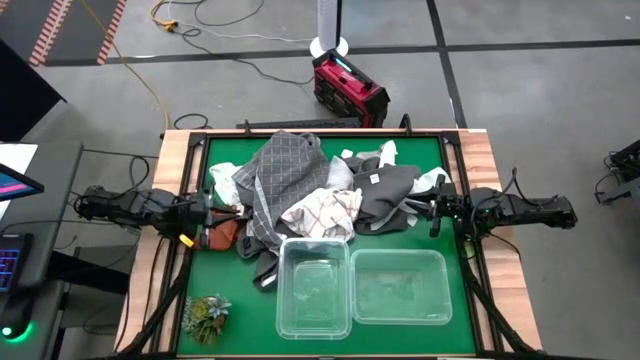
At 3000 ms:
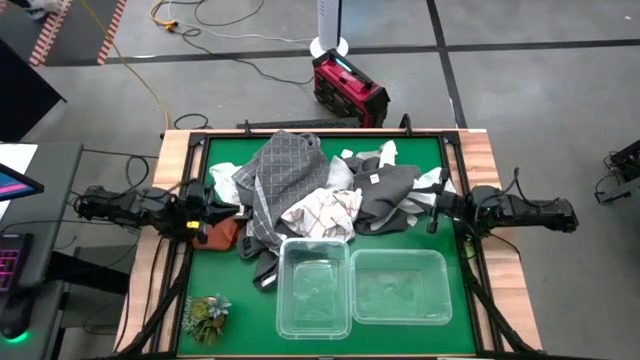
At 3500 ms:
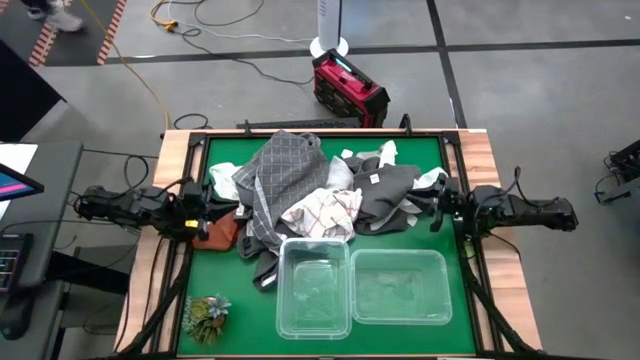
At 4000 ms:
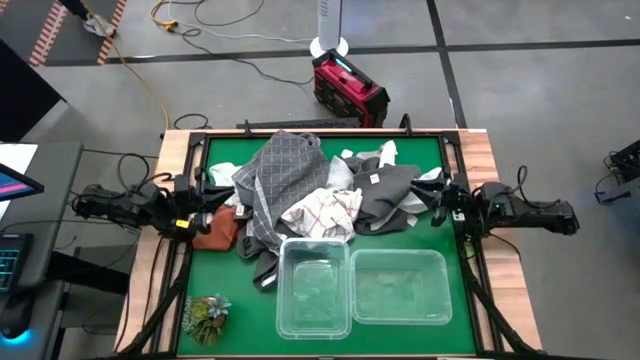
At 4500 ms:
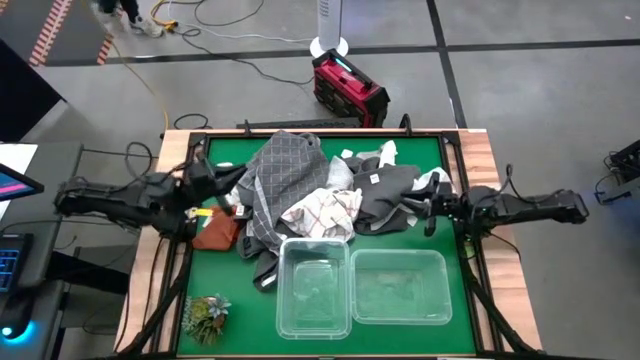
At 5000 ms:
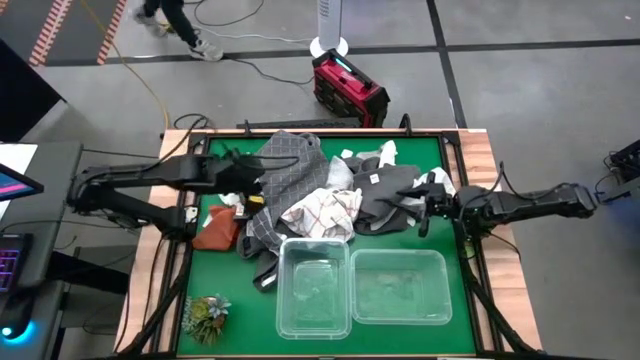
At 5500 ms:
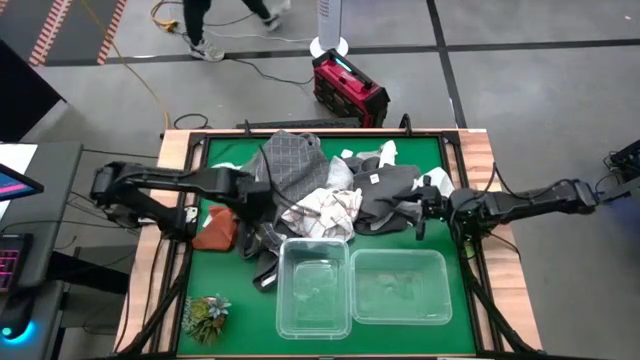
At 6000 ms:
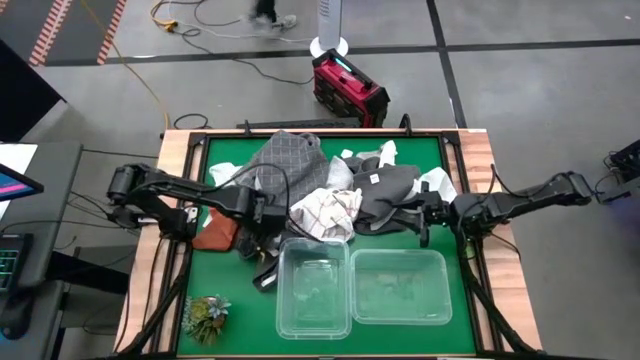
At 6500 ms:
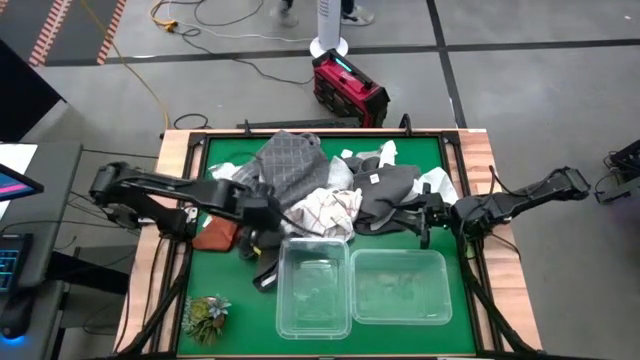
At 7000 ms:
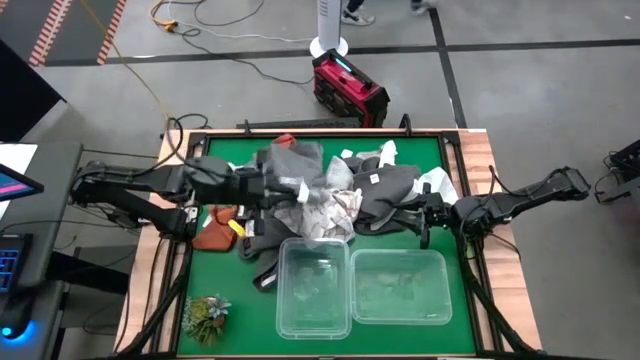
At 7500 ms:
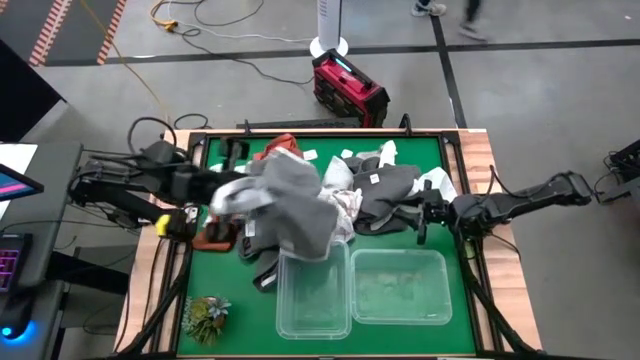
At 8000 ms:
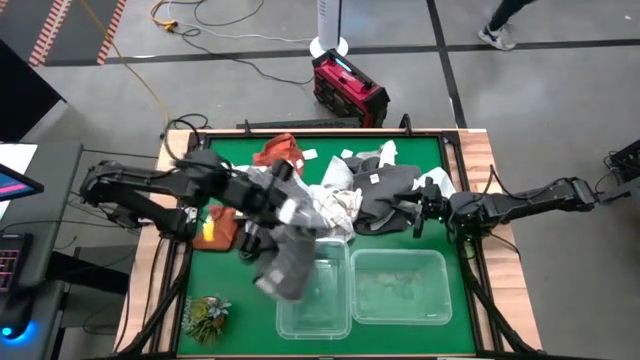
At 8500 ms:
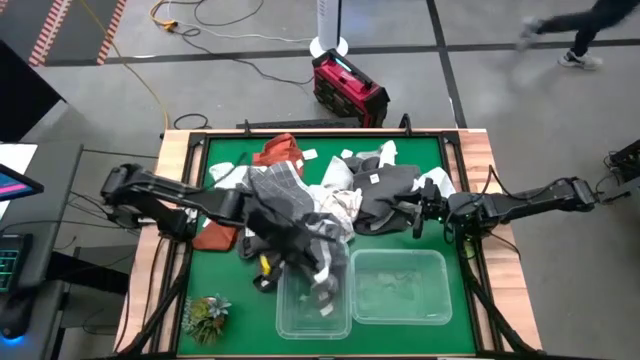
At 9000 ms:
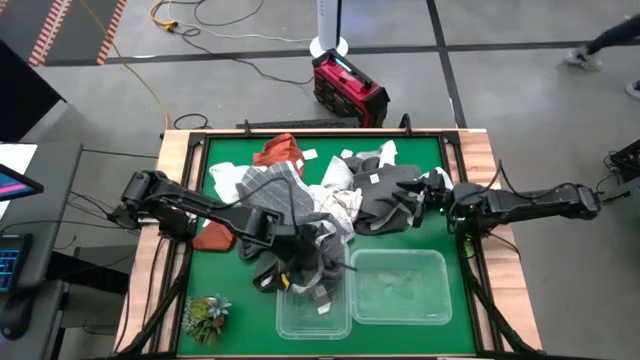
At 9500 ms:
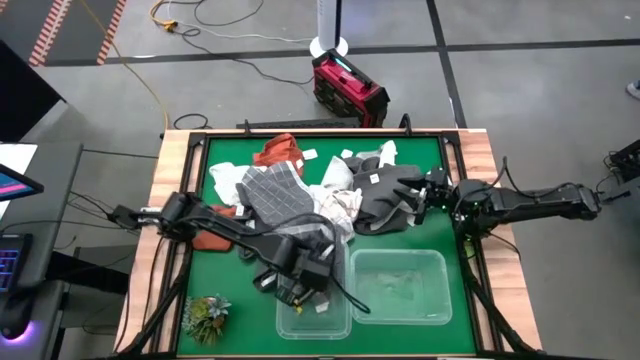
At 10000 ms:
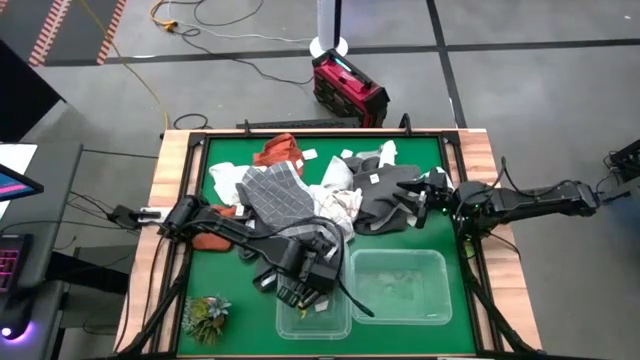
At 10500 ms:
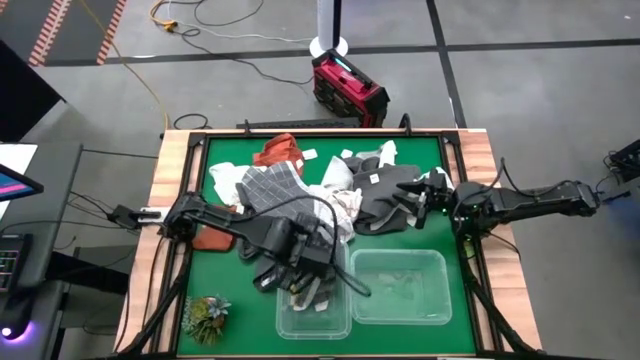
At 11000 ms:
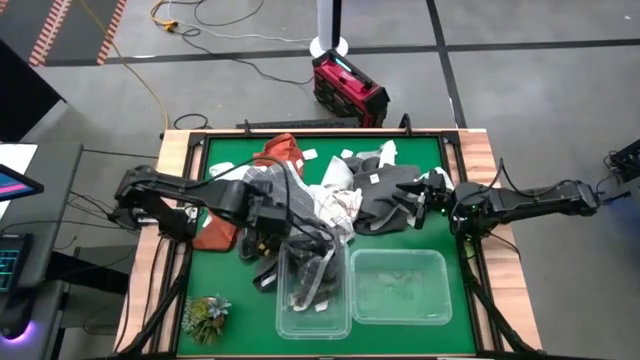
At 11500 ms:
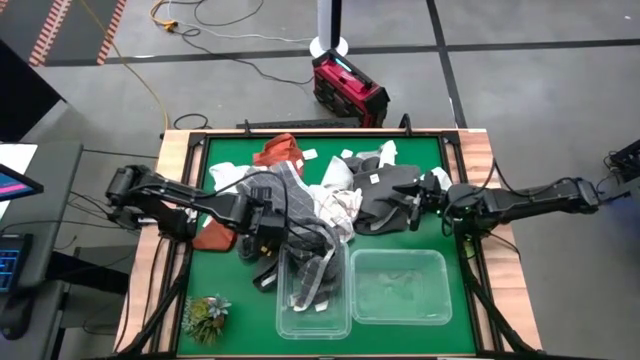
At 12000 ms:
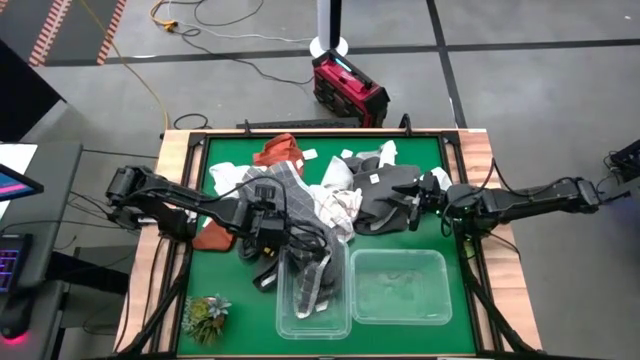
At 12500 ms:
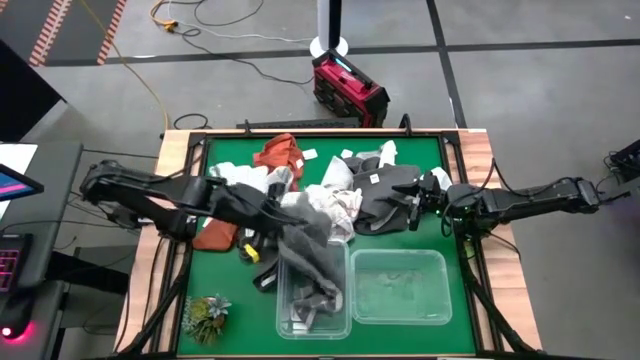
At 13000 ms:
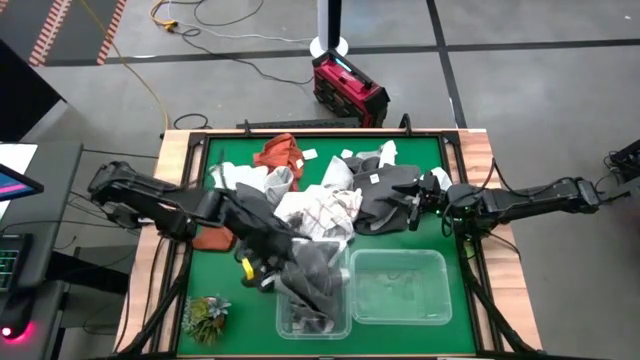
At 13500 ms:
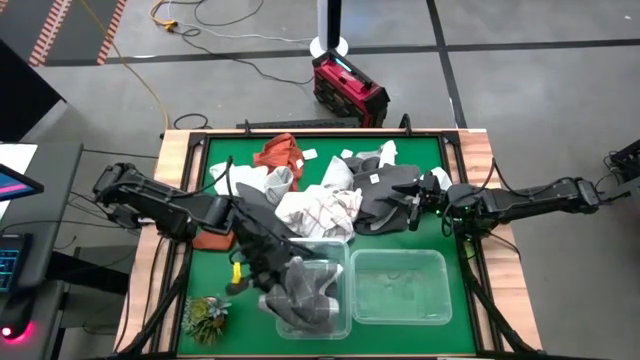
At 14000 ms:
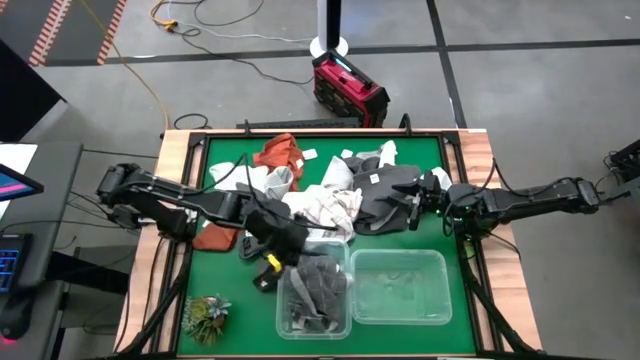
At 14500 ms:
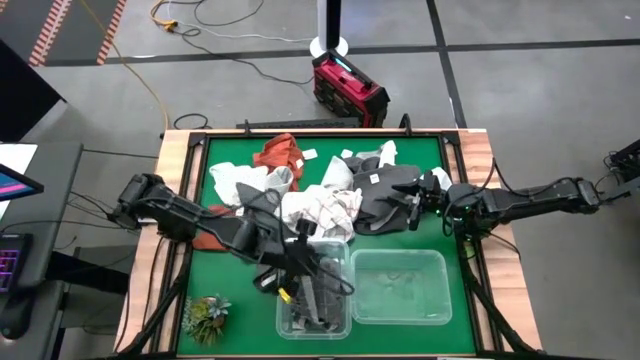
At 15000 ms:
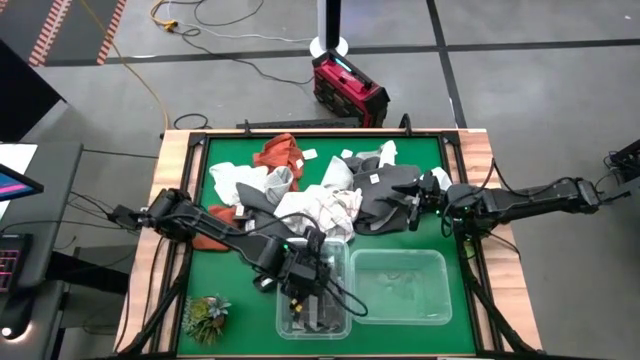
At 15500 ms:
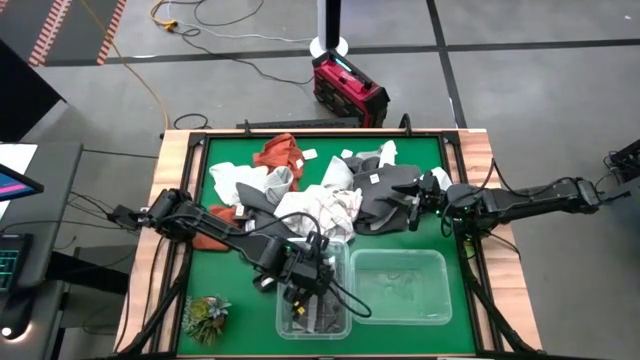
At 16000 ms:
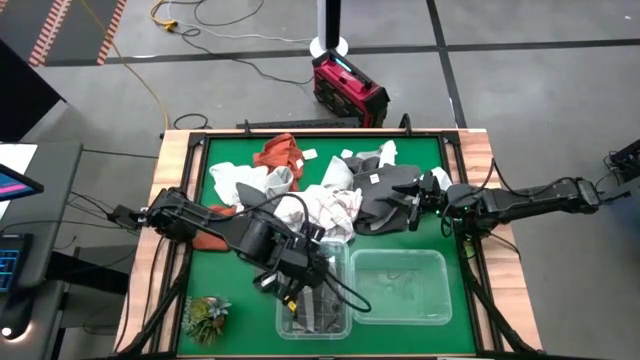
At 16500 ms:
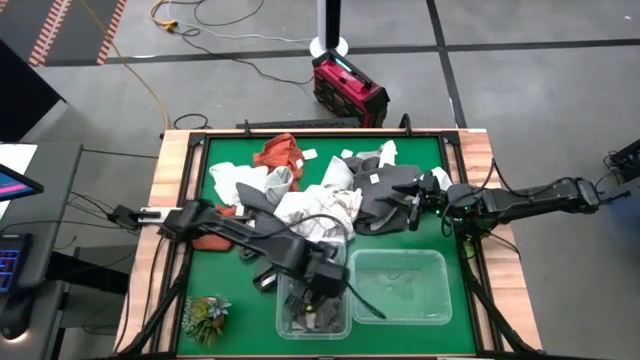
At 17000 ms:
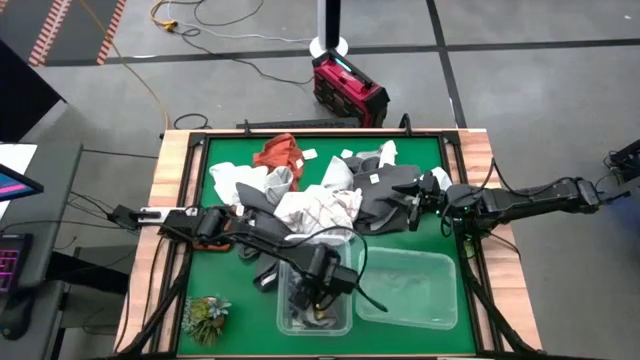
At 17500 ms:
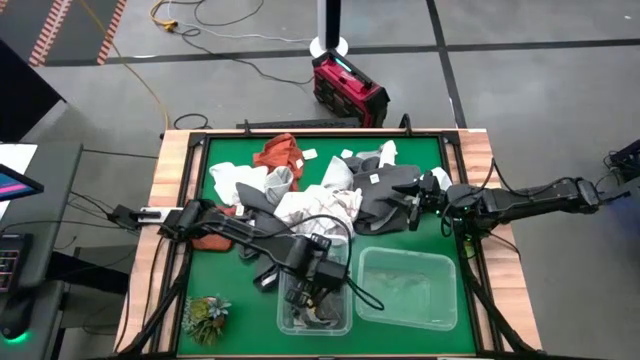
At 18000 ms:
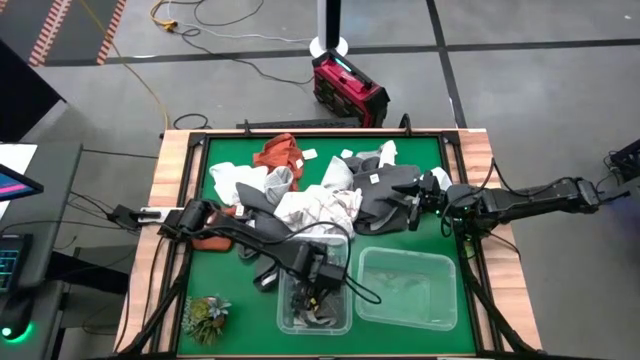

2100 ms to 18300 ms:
Task: Sort towels by color in basket
Put the grey and white towel into the left transparent bin

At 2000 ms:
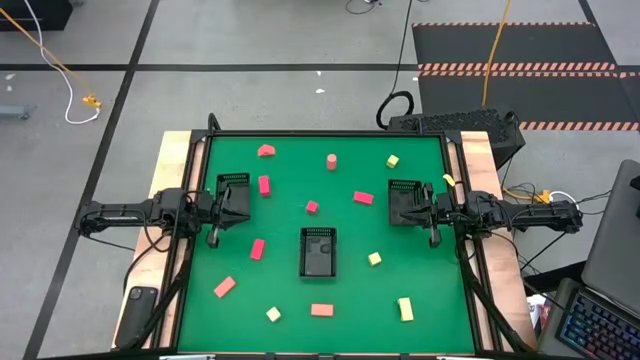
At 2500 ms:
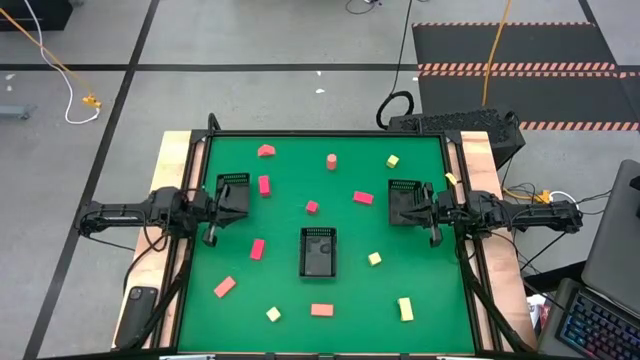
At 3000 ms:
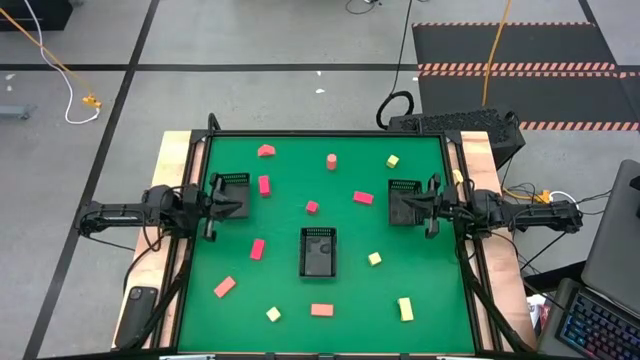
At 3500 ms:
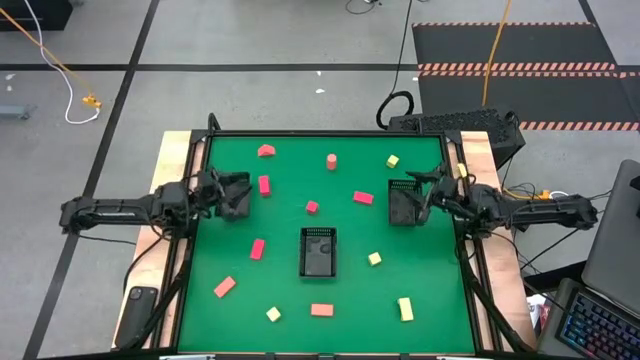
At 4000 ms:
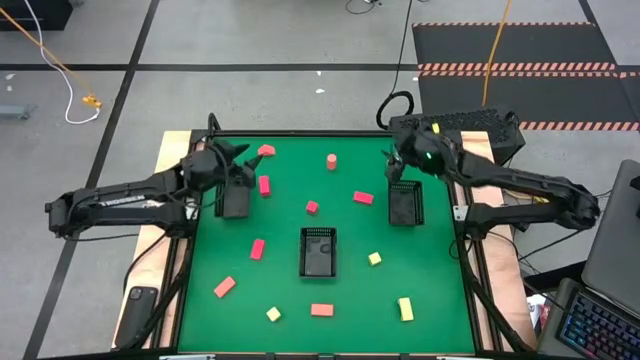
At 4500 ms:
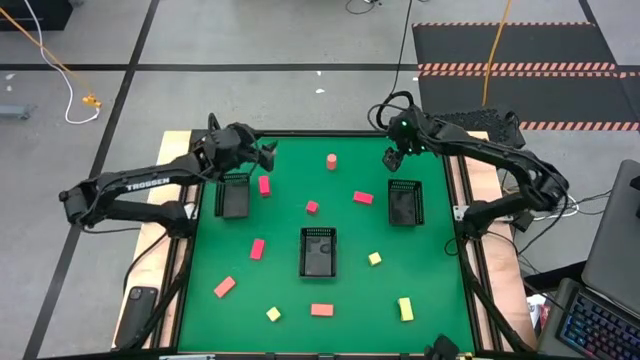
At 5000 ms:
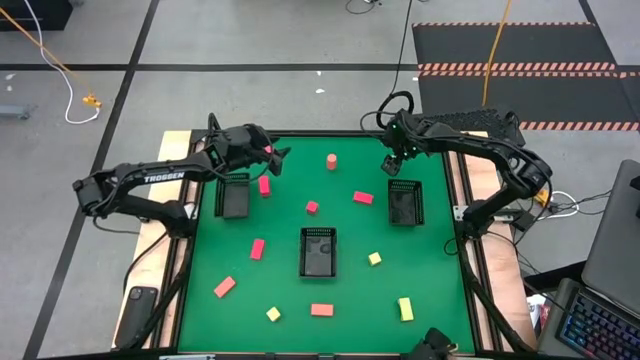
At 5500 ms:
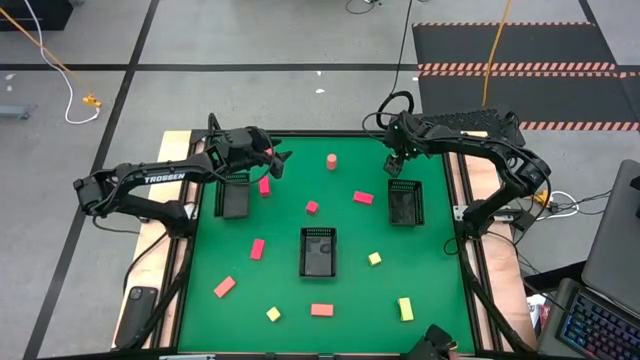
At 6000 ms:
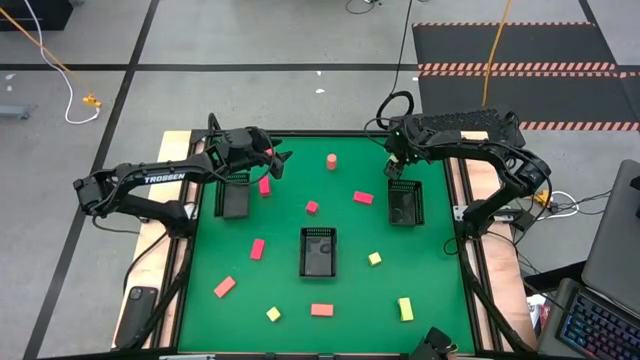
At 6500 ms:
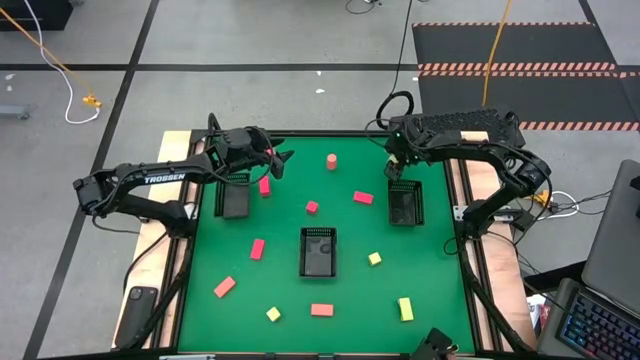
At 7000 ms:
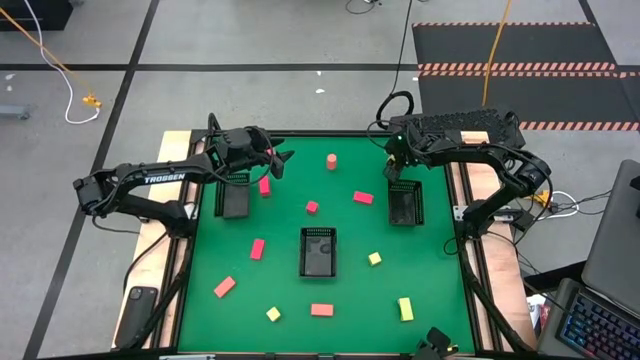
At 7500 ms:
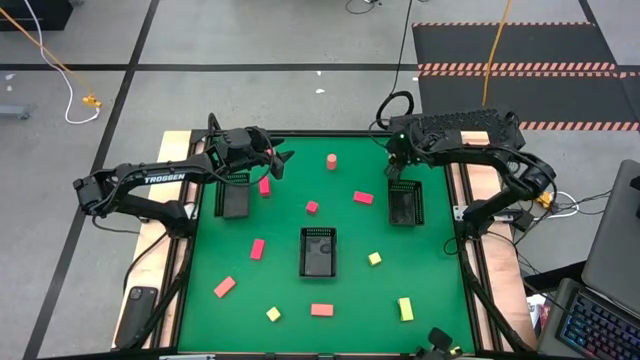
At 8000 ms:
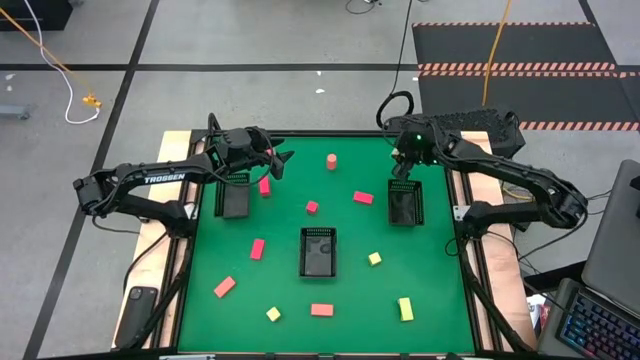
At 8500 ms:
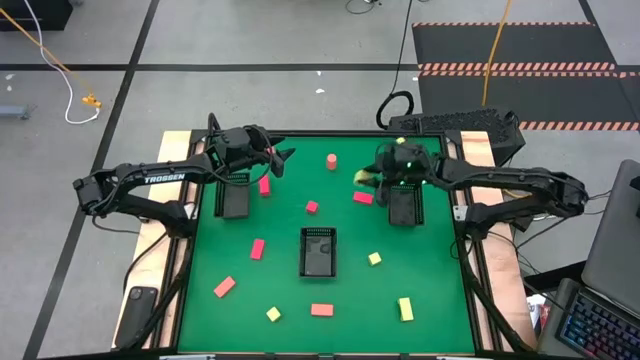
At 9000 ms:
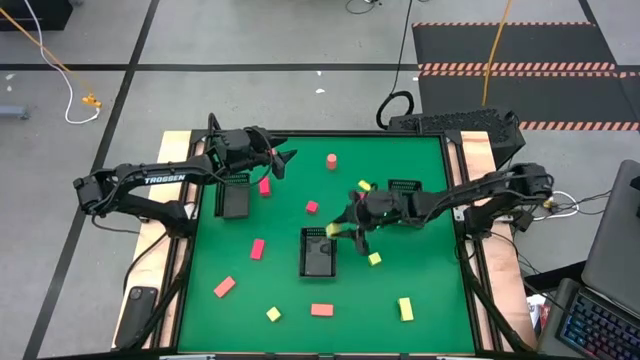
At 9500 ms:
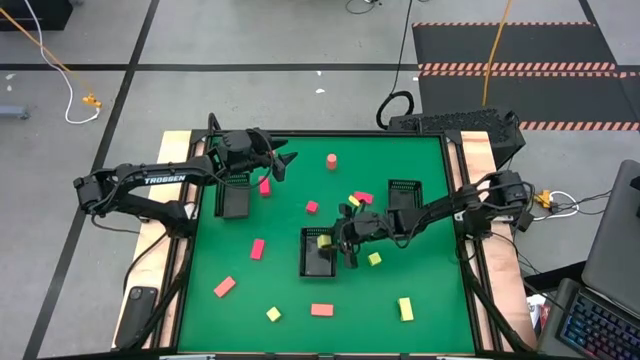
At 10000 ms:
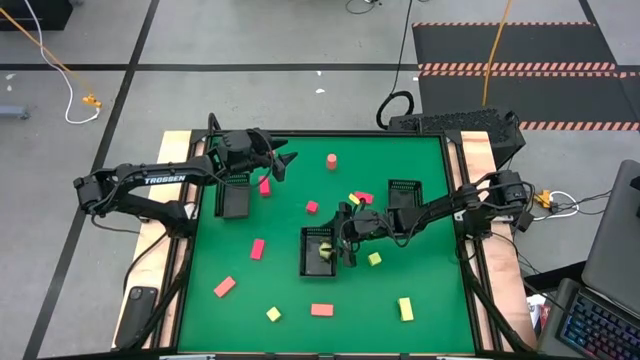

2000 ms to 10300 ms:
Task: Sort & place blocks by color
Put the light green block into the middle black basket
